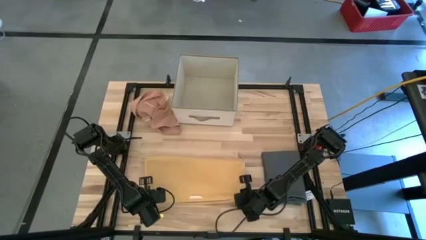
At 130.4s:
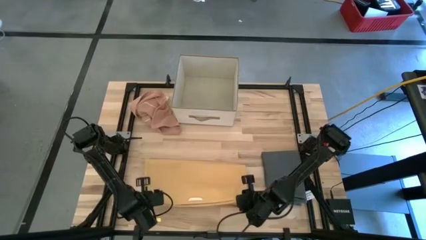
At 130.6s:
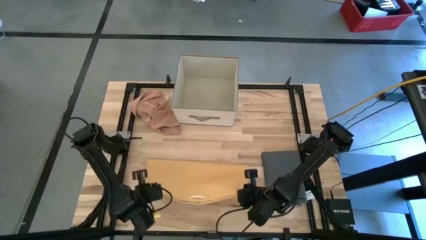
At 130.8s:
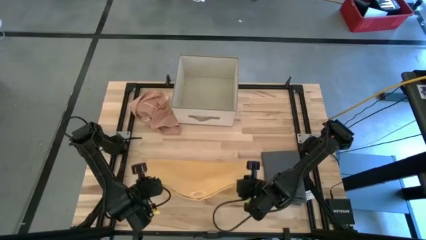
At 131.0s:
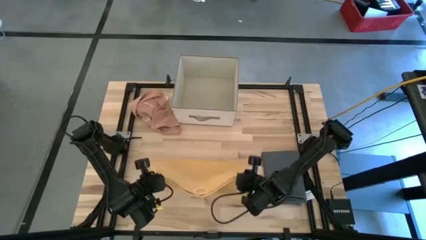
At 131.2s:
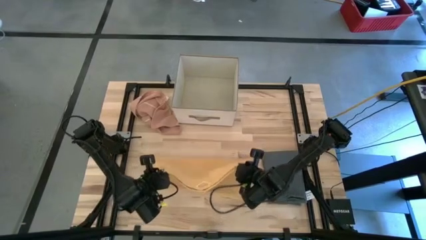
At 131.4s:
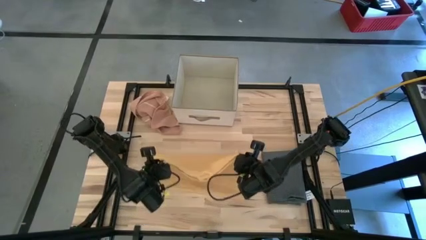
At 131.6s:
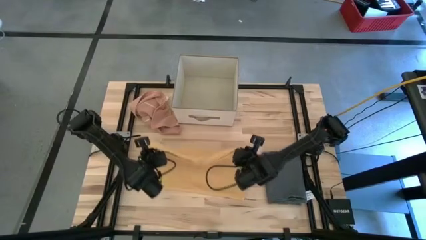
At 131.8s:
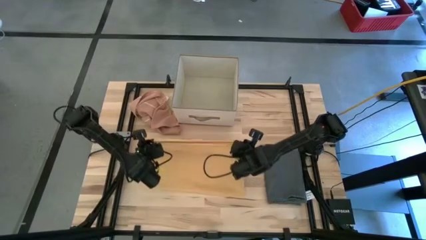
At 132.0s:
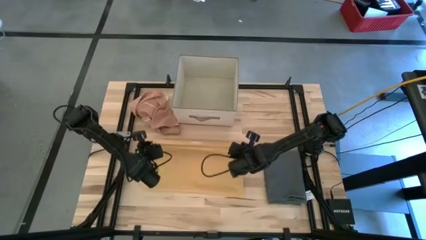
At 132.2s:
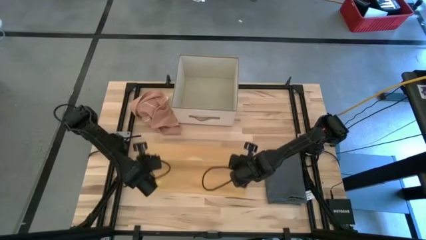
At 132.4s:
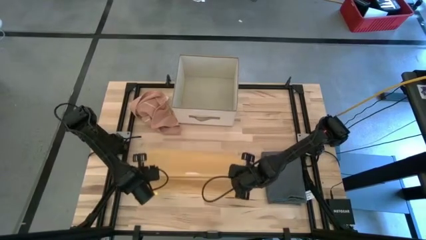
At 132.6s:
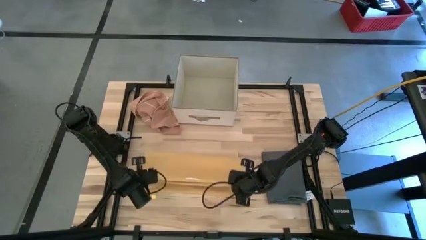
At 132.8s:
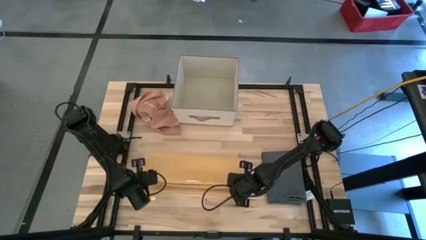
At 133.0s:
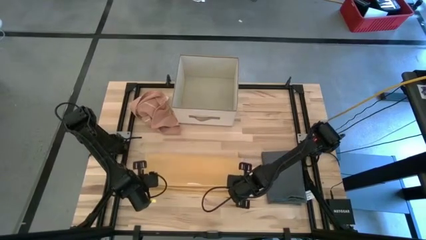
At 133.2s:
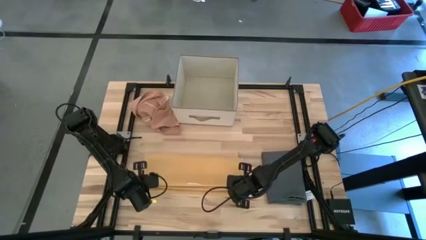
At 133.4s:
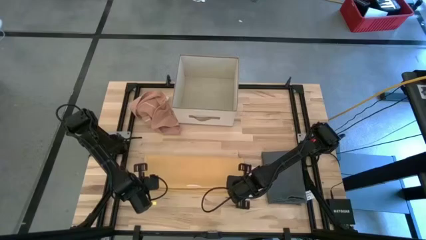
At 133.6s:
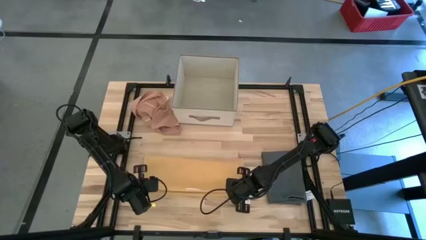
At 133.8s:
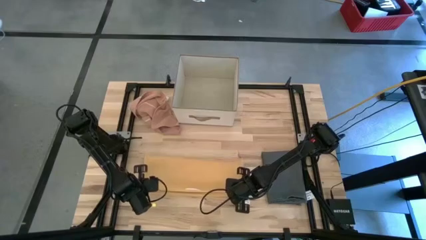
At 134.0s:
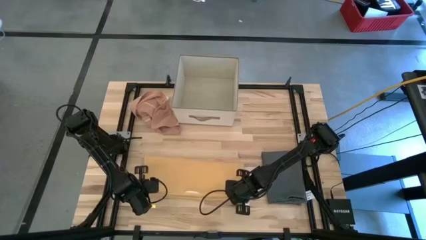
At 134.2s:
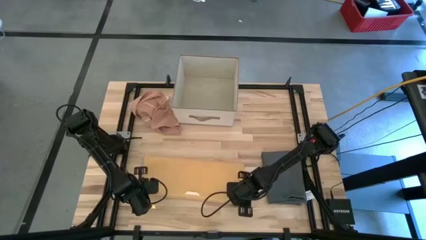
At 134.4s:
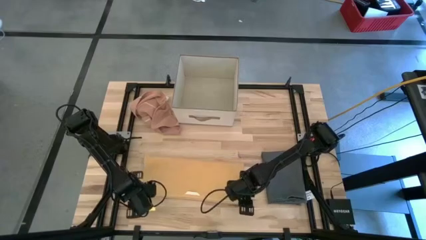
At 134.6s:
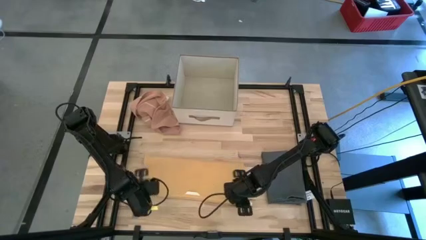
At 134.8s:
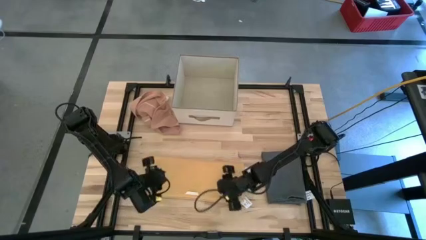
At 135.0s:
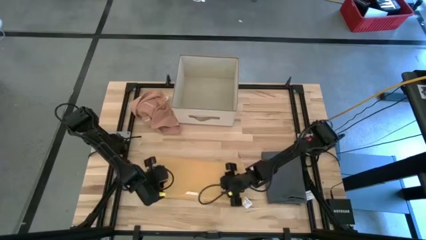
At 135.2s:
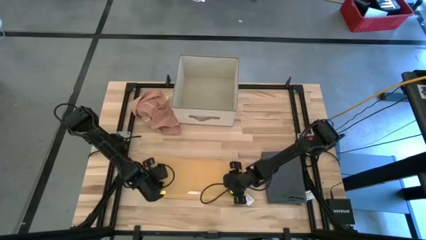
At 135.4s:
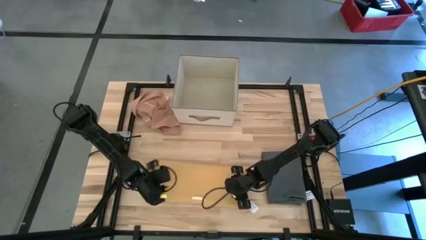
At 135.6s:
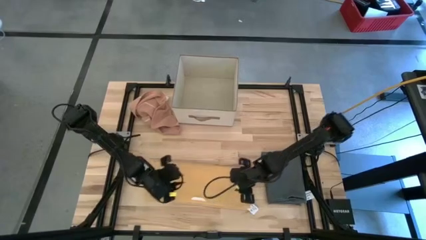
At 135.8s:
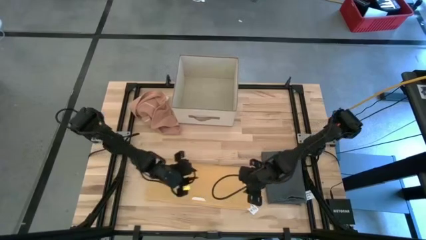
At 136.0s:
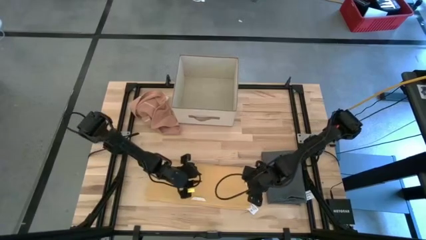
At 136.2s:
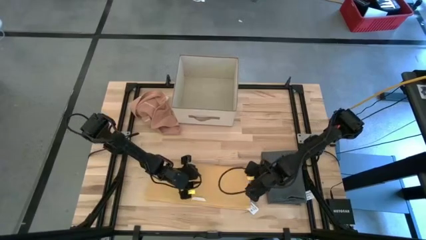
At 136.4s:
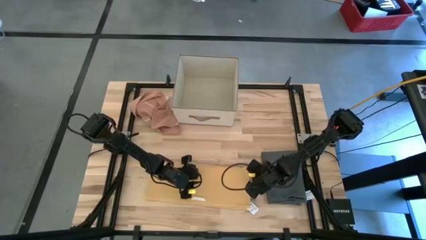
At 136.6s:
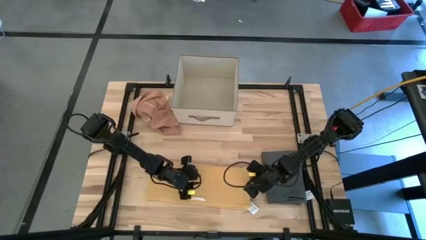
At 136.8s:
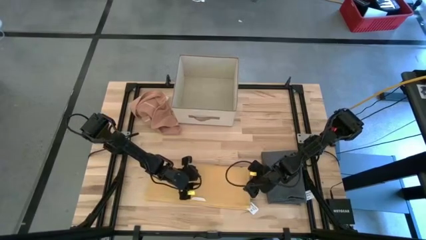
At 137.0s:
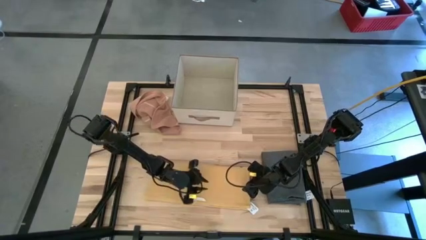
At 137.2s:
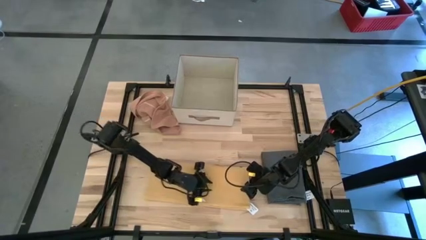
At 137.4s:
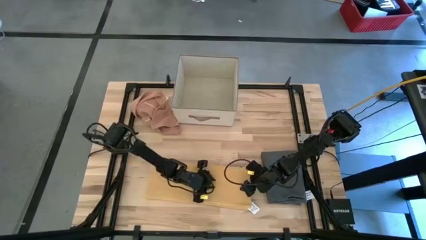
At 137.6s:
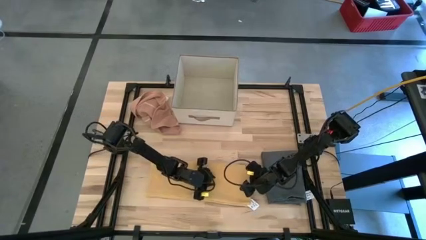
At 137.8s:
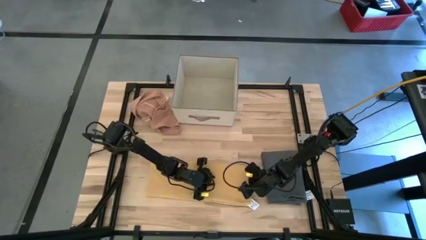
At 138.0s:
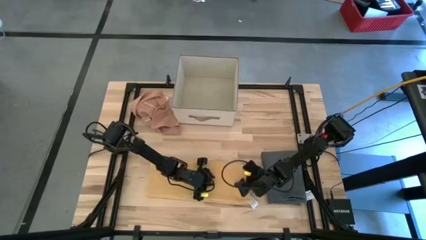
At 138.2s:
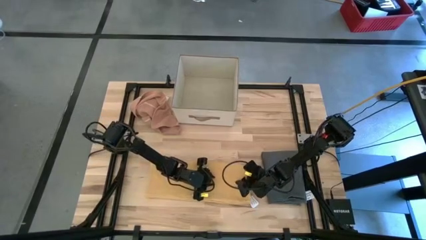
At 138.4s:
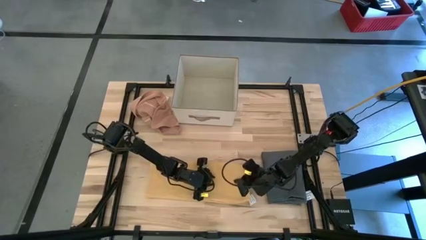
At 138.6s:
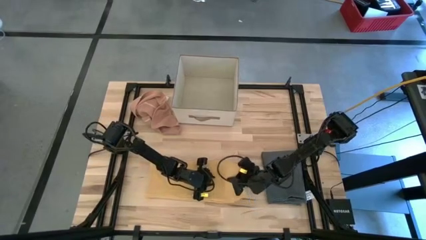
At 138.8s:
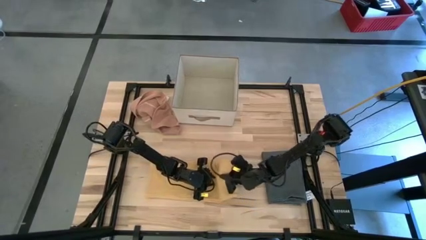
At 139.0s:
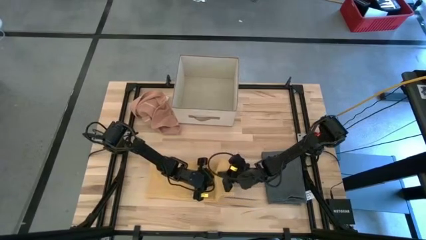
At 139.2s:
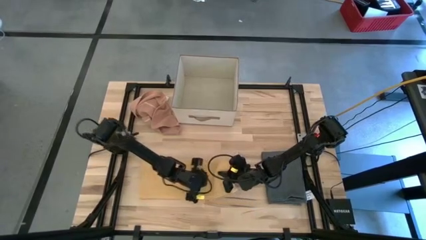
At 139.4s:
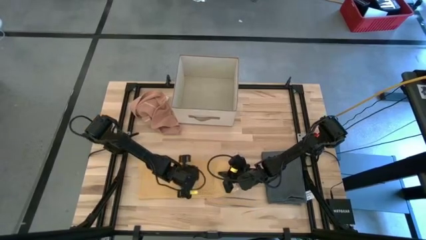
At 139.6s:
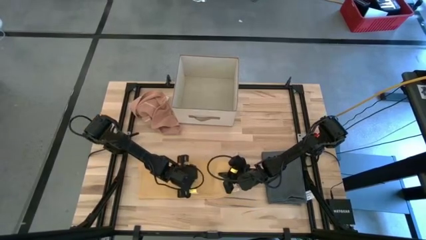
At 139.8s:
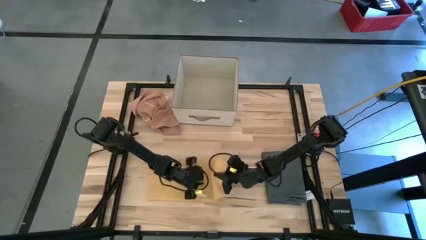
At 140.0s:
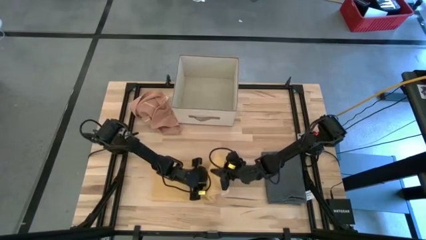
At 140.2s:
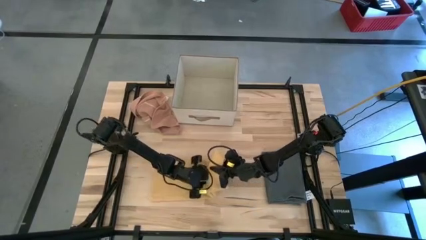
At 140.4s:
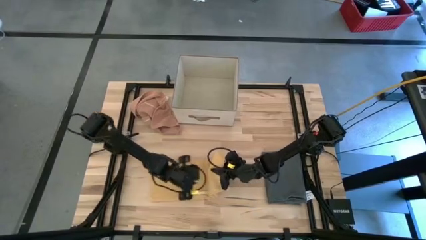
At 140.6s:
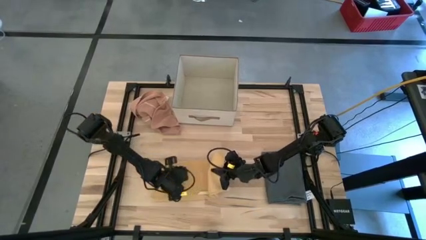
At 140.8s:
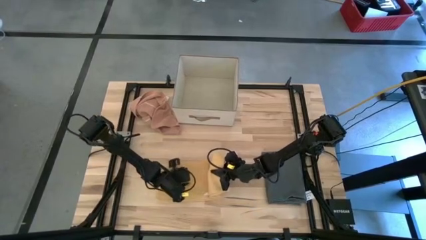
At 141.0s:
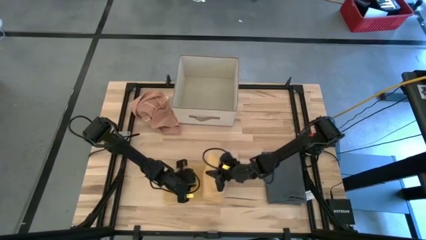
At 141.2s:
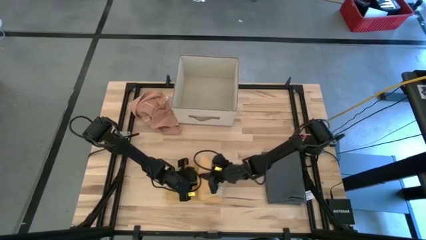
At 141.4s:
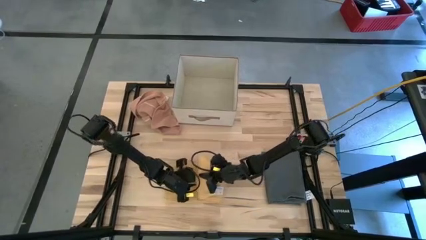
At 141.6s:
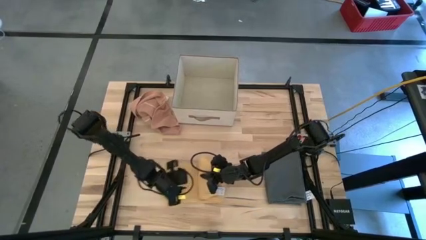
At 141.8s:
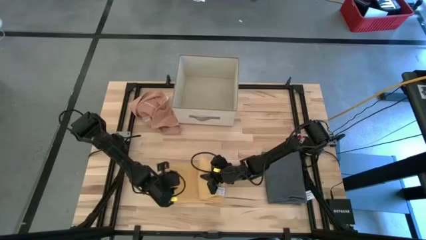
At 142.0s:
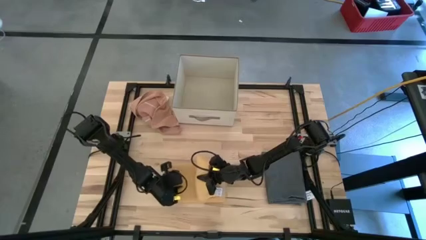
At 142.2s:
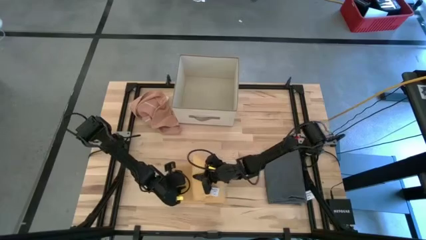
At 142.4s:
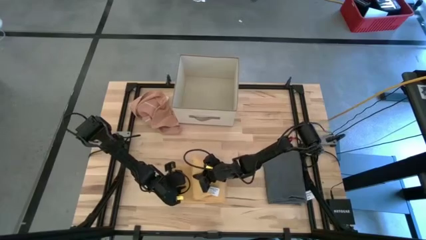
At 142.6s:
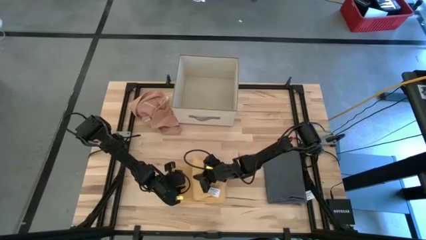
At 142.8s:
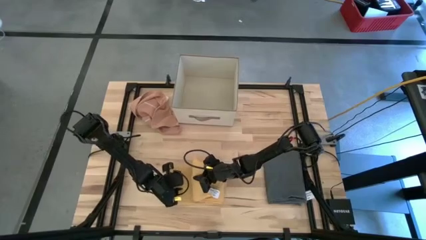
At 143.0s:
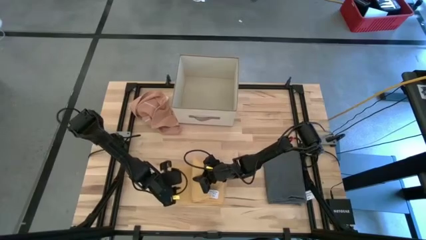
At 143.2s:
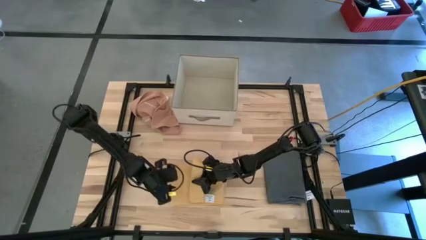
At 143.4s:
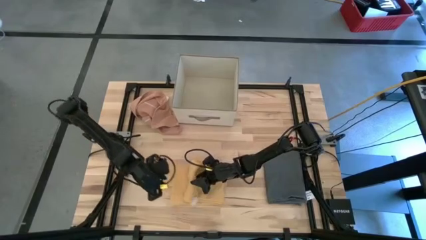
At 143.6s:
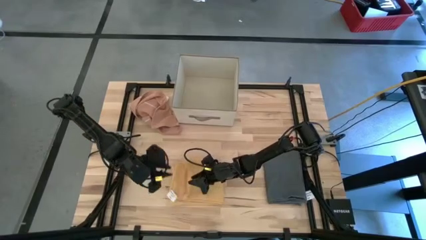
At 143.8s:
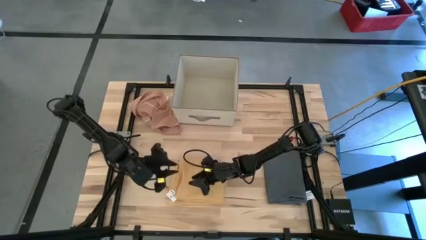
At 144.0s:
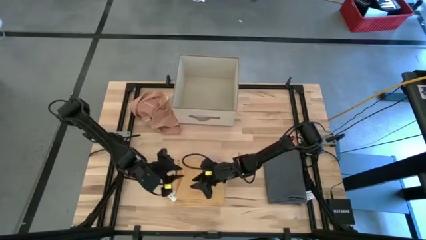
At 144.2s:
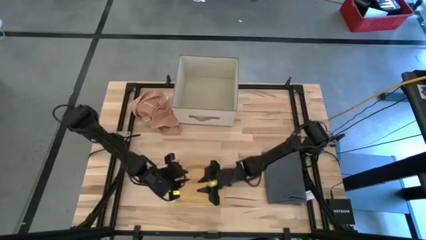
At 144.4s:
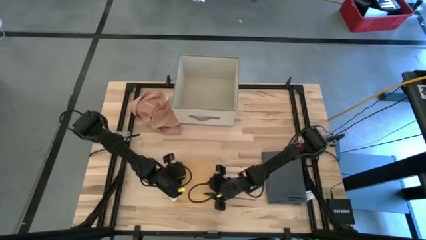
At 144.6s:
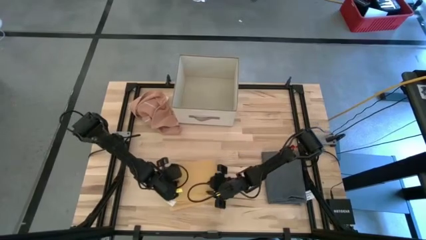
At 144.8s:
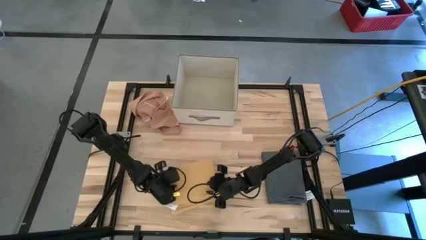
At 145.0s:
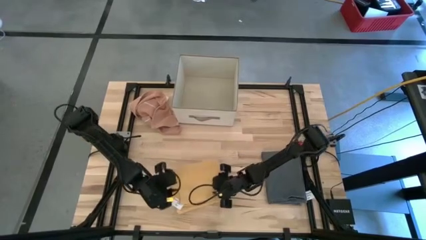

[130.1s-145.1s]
Task: Fold towel
Fold the yellow towel

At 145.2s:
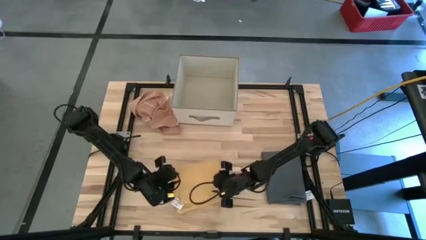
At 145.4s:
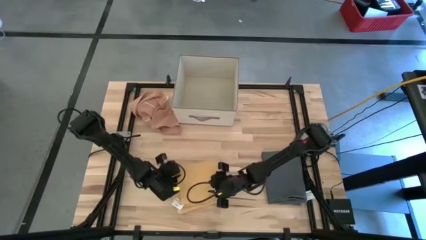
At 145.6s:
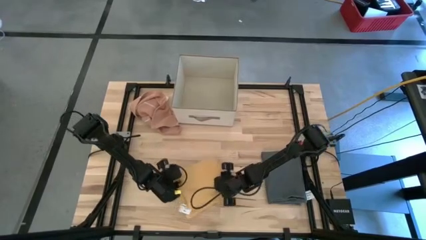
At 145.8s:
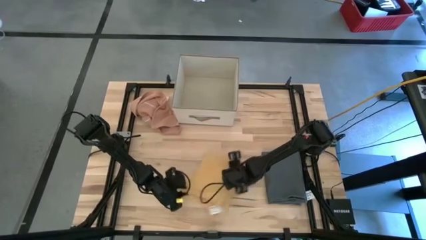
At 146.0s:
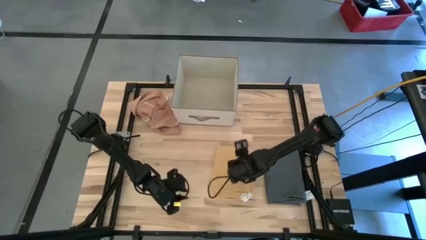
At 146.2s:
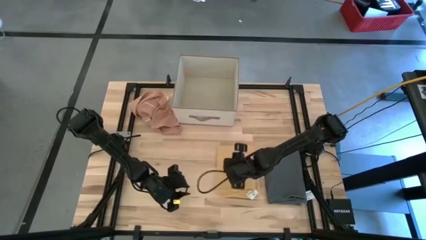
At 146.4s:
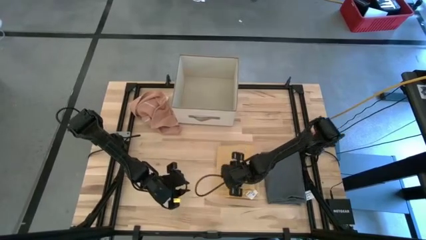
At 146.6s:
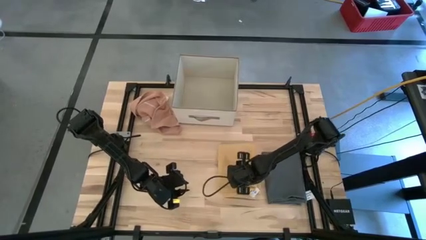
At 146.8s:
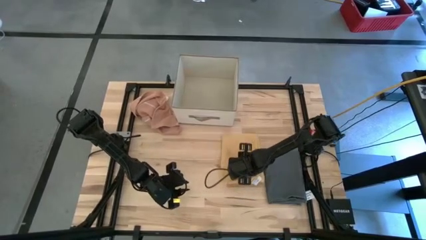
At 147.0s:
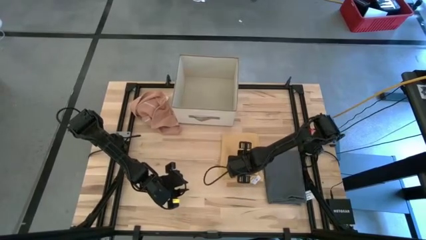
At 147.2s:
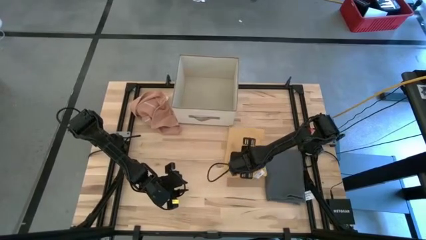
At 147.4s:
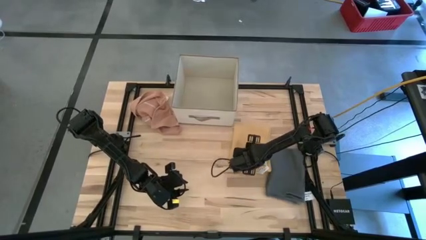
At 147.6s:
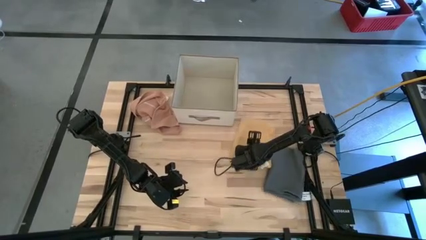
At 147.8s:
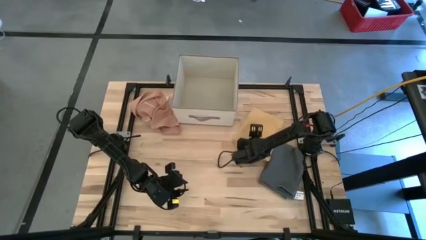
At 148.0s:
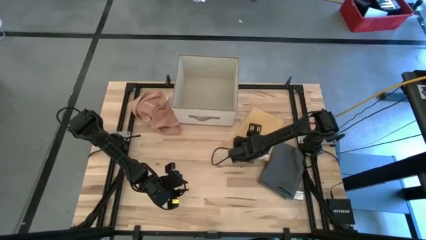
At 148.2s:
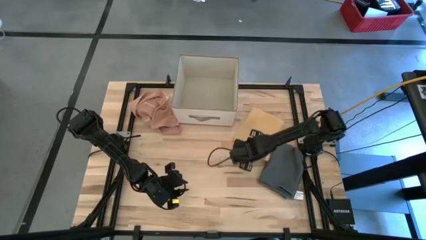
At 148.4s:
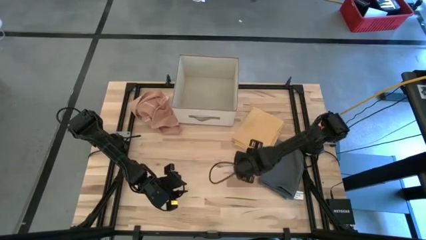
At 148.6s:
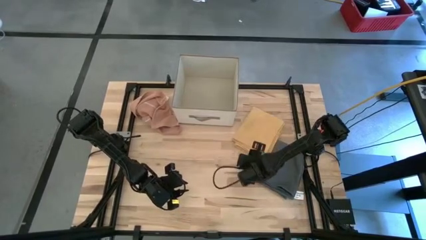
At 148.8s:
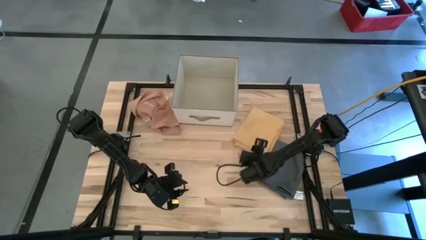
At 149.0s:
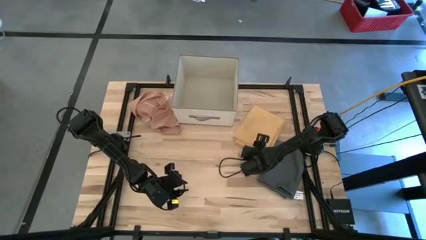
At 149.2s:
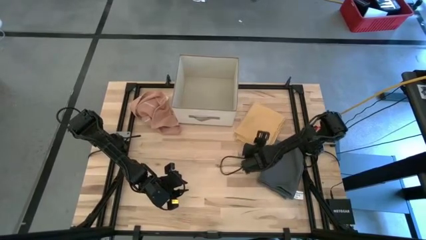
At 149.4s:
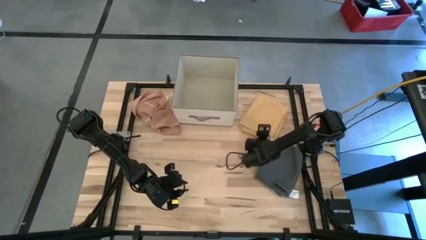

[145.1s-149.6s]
Move the orange towel to the top right of the table
